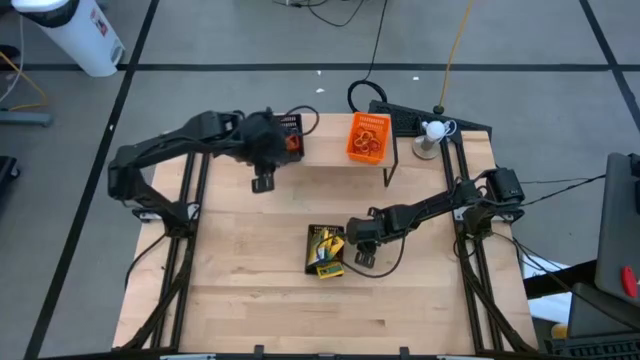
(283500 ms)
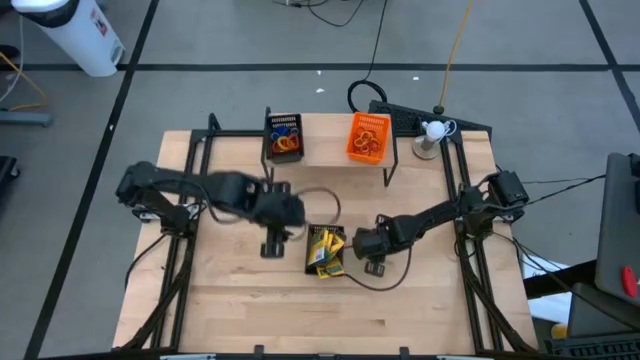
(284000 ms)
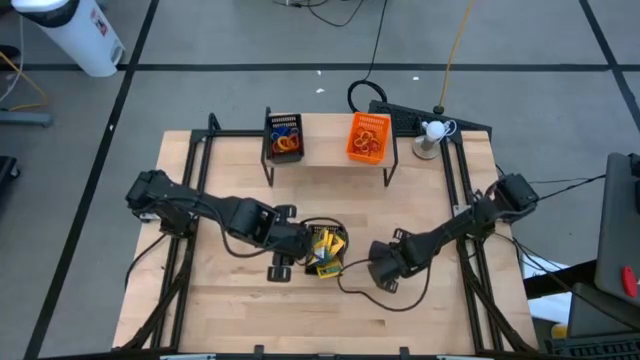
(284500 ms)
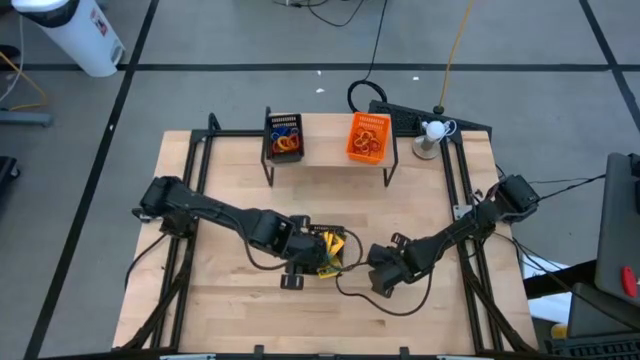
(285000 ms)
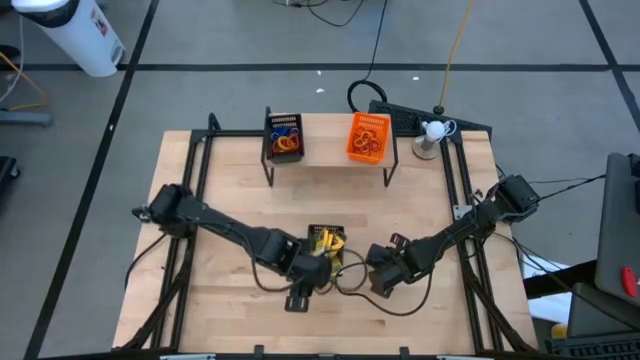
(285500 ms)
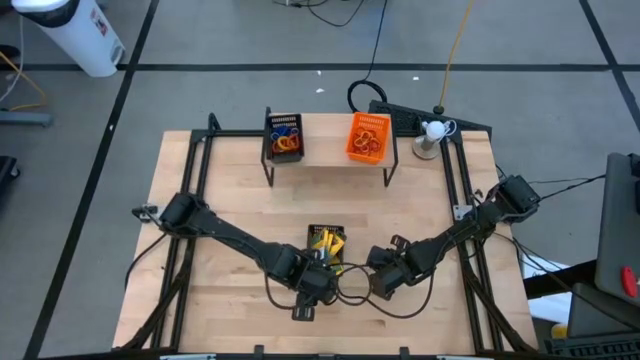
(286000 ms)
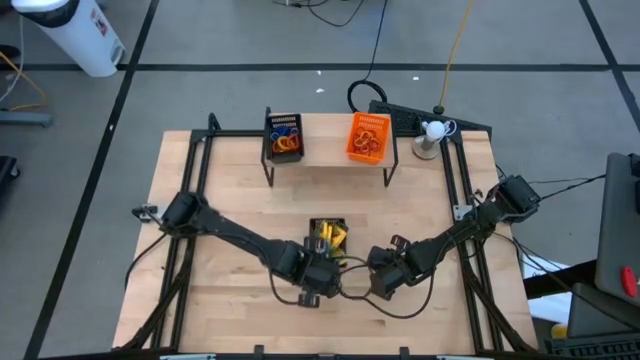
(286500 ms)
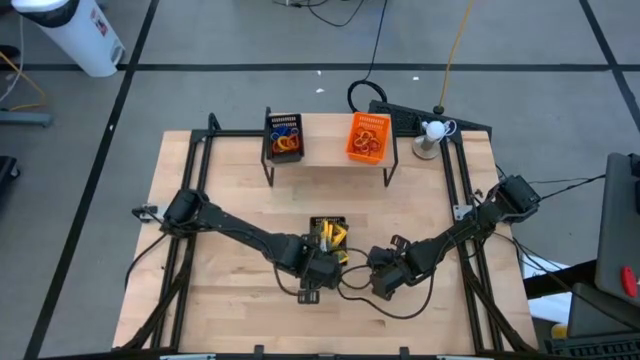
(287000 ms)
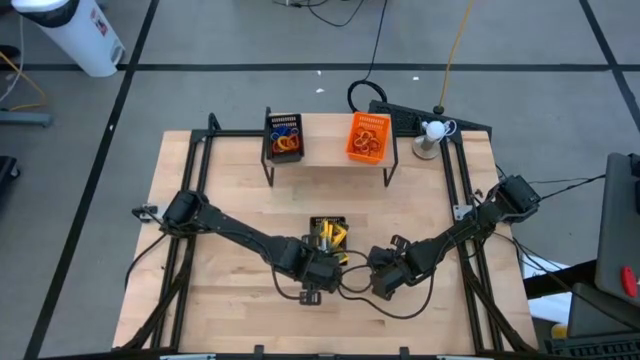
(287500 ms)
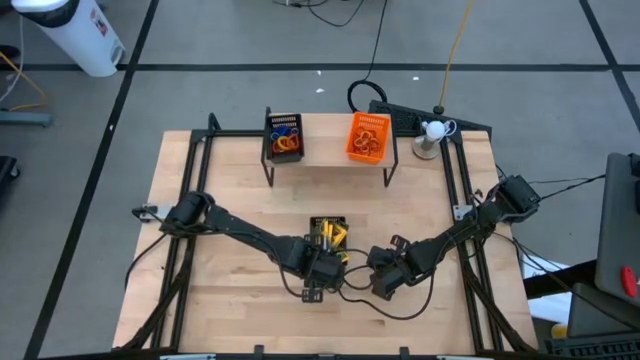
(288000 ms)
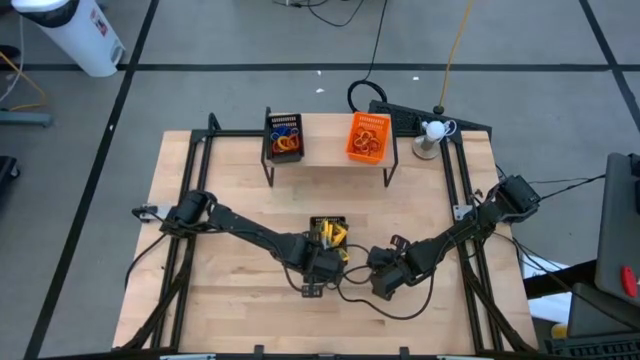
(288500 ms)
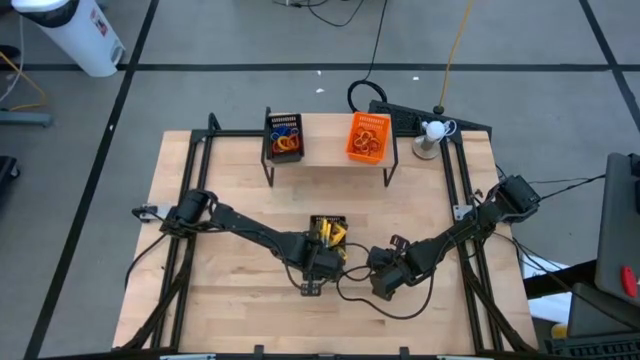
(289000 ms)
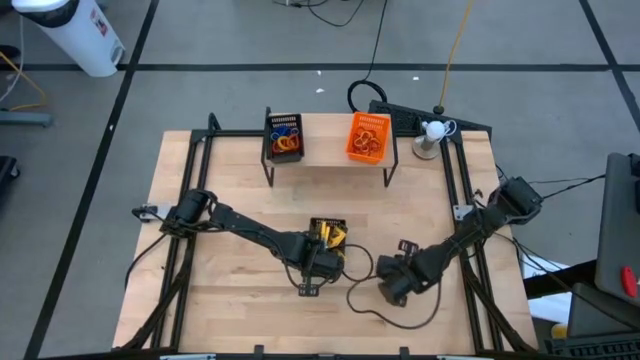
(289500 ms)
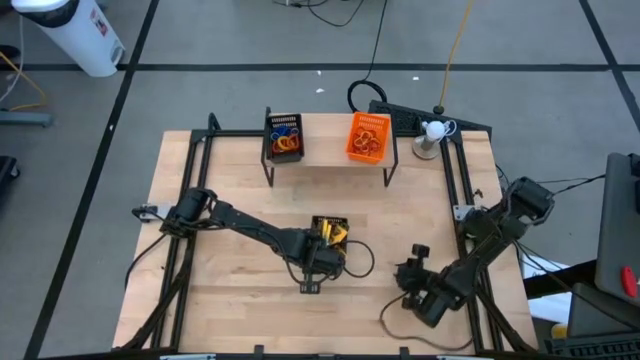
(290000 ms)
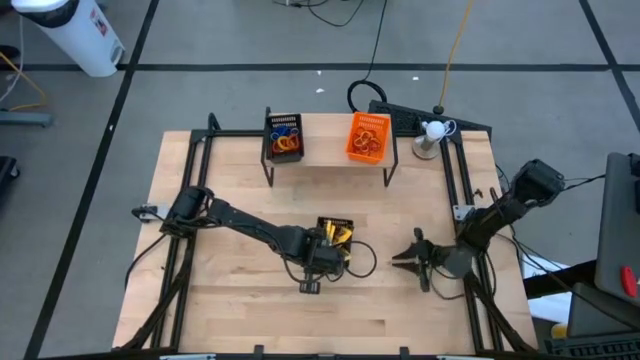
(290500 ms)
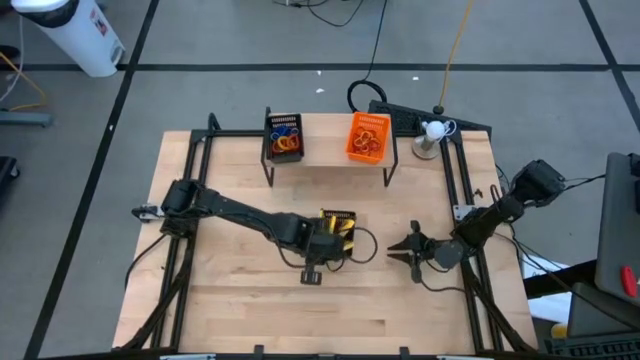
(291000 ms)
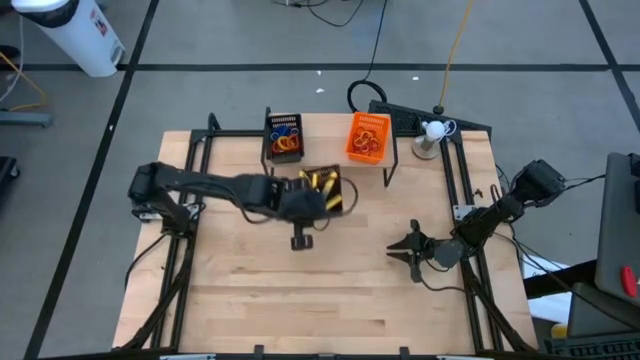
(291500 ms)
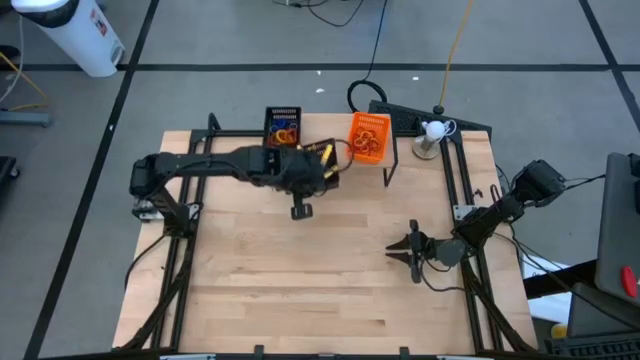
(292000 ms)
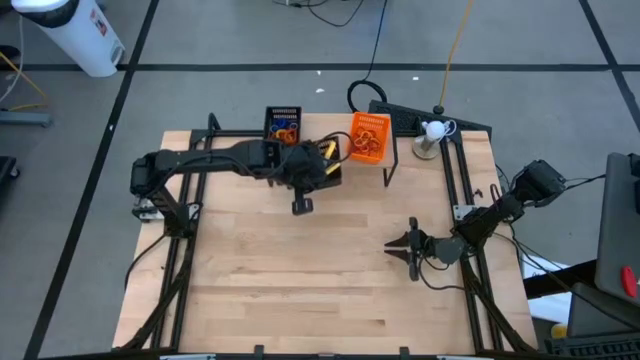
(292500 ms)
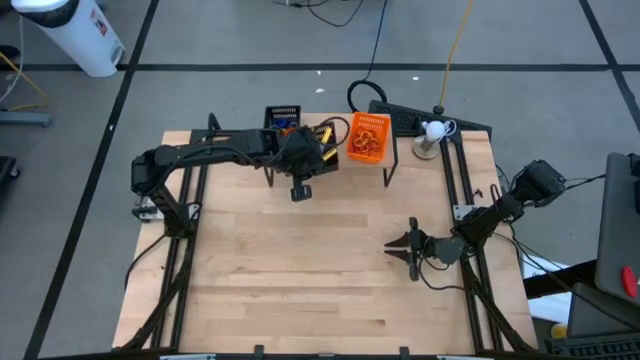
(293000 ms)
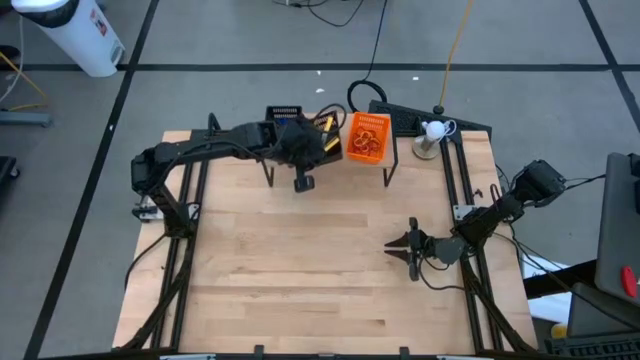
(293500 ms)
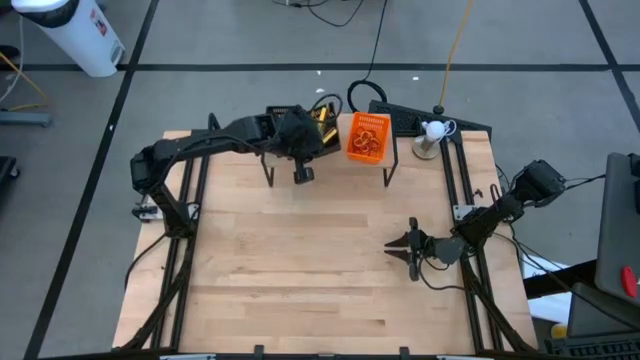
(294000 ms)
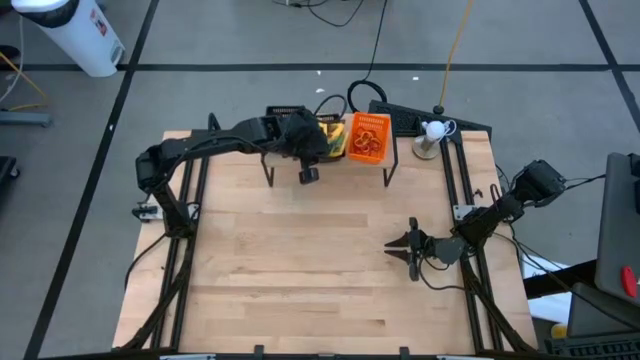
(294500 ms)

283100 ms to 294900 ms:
Task: Pick & Place Office Desk Supplies
Put the black bin with crayon boxes on the shelf

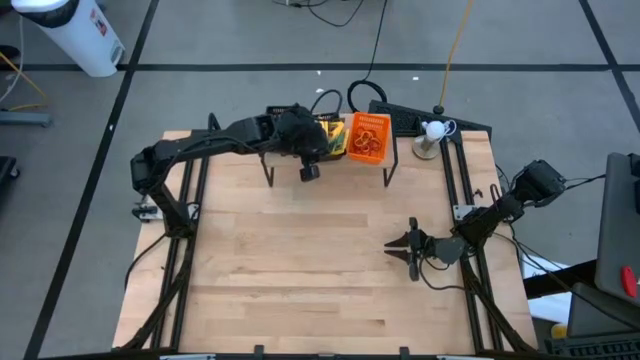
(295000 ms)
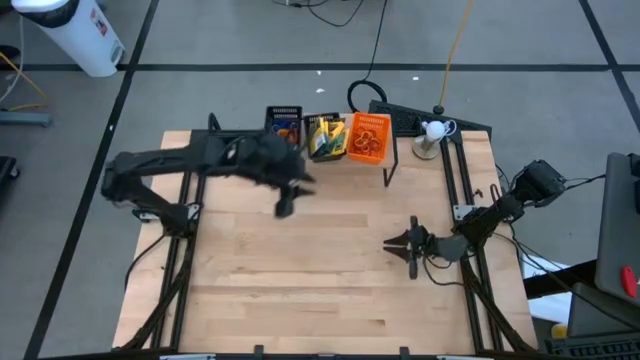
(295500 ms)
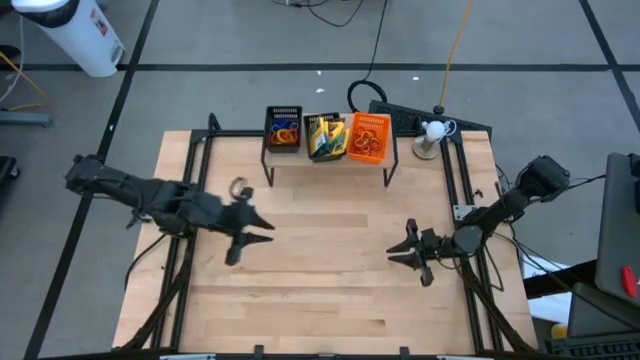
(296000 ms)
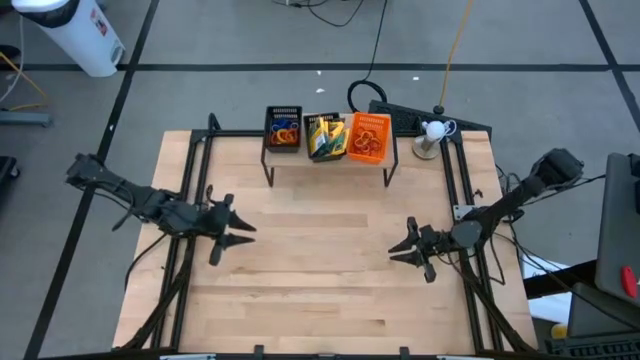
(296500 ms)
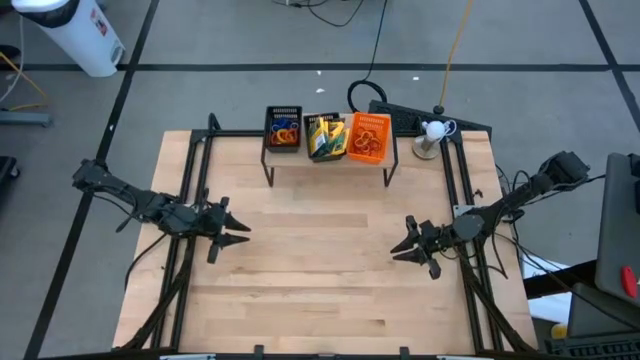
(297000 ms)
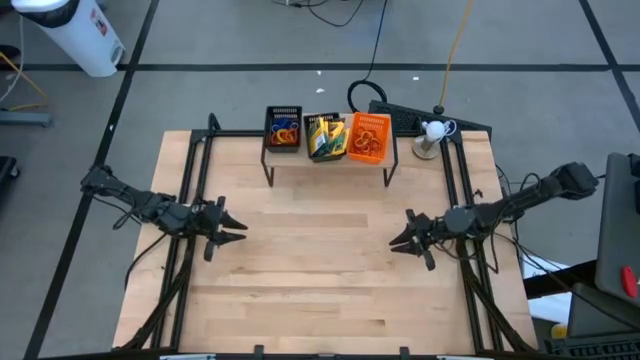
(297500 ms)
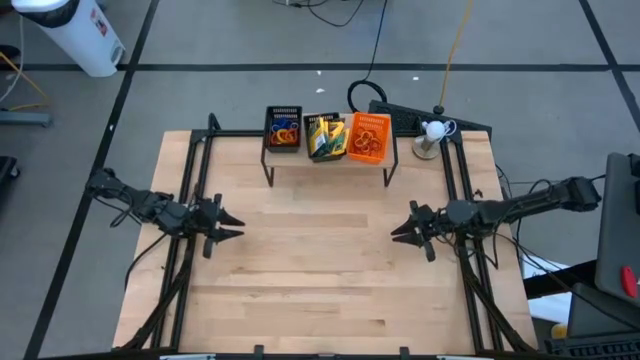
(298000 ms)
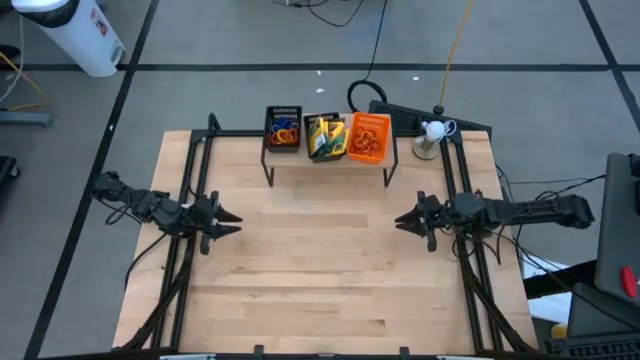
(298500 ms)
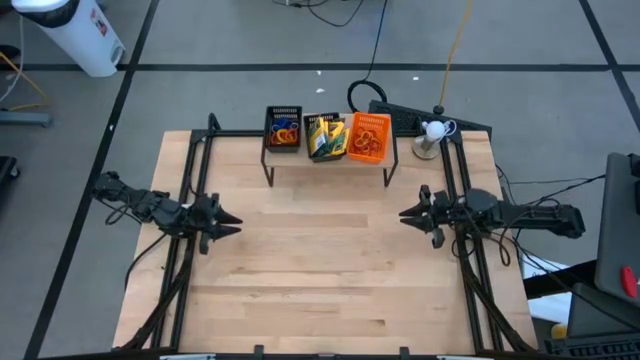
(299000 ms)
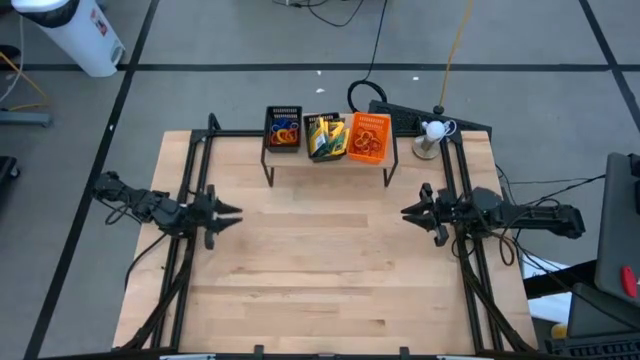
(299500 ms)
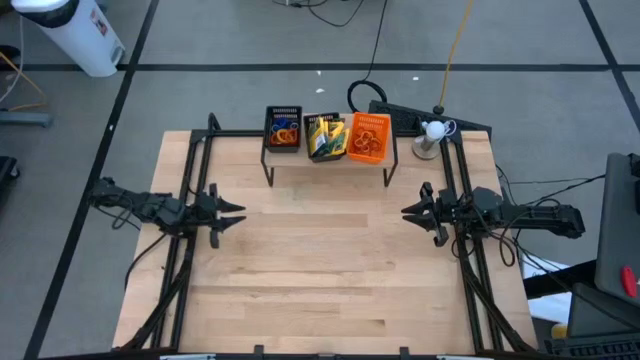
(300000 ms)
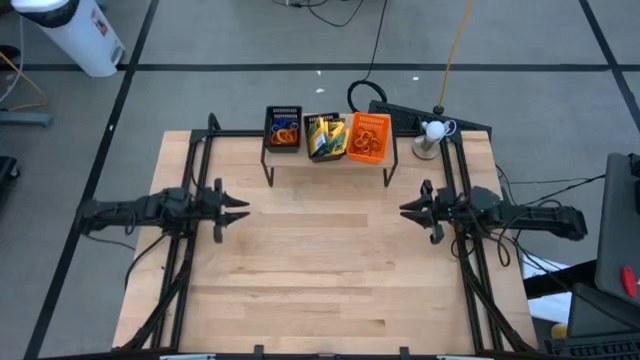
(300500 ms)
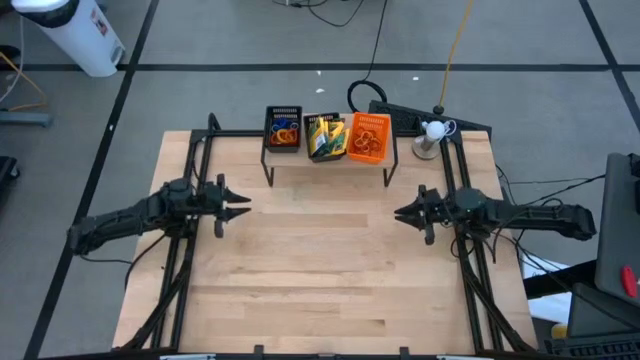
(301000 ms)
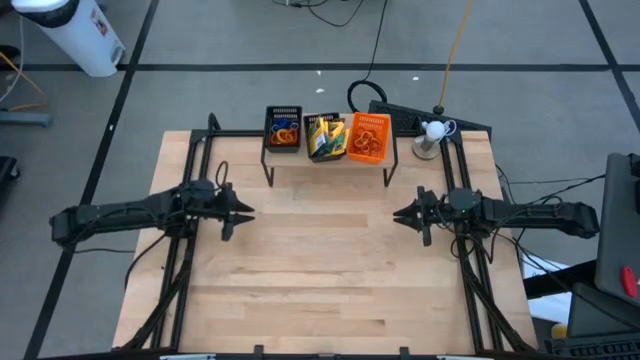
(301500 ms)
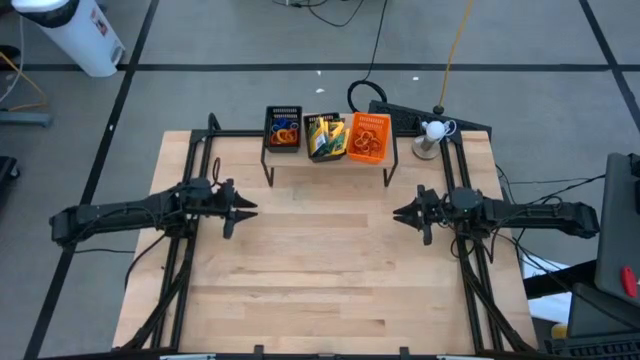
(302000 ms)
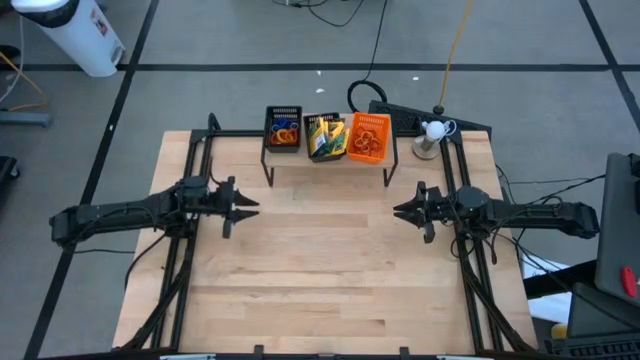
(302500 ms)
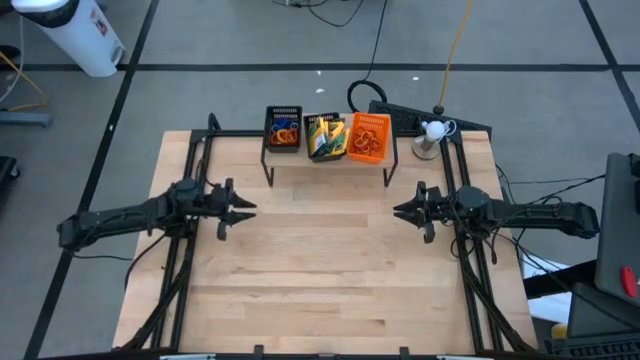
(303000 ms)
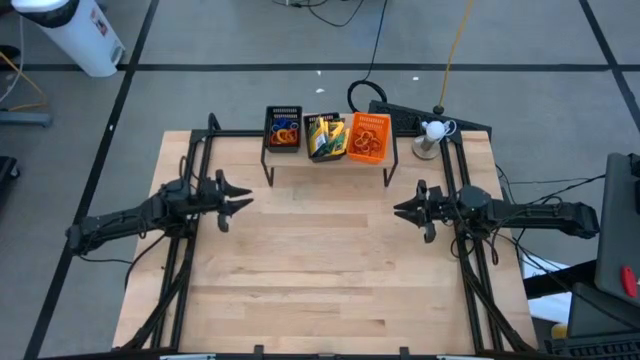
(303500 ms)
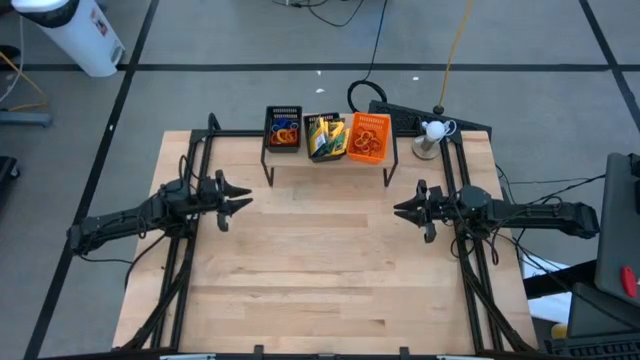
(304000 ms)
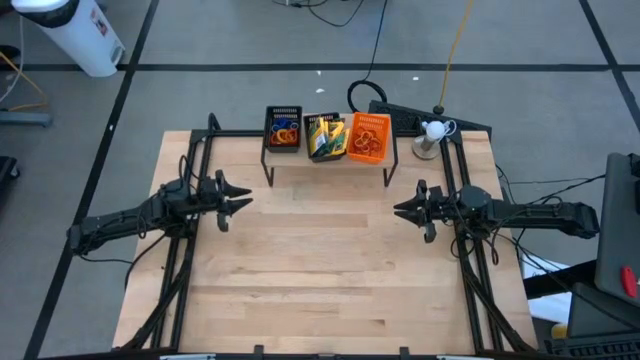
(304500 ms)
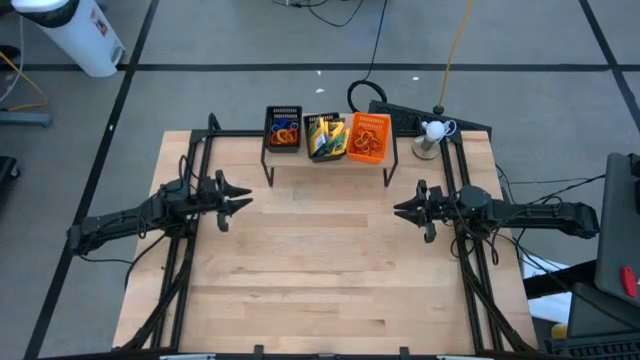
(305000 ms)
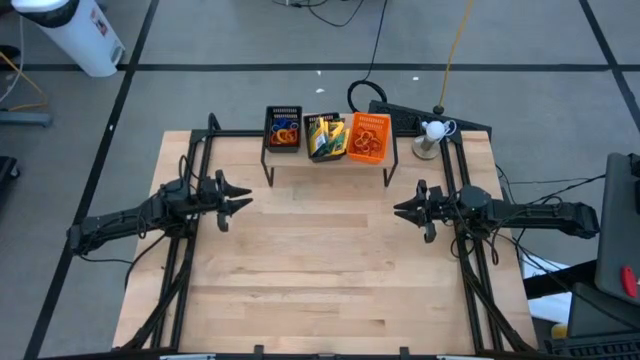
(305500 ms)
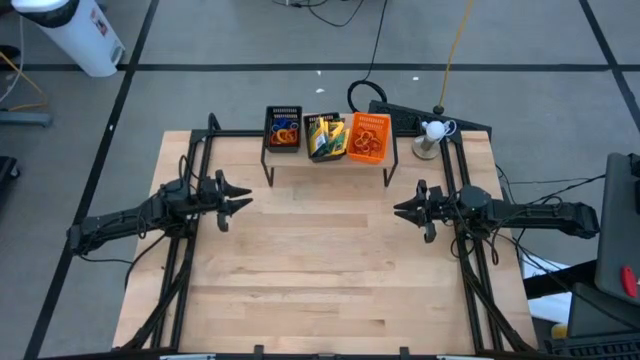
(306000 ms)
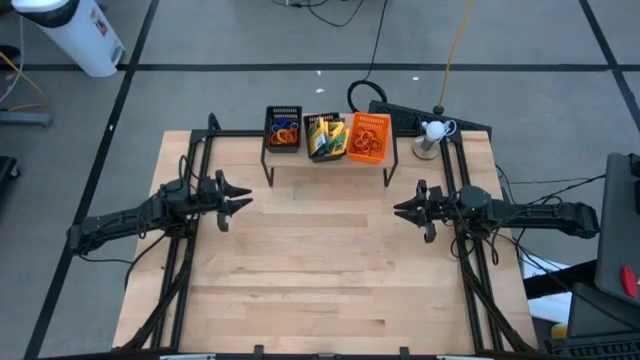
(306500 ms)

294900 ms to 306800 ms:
Return to Home Position
